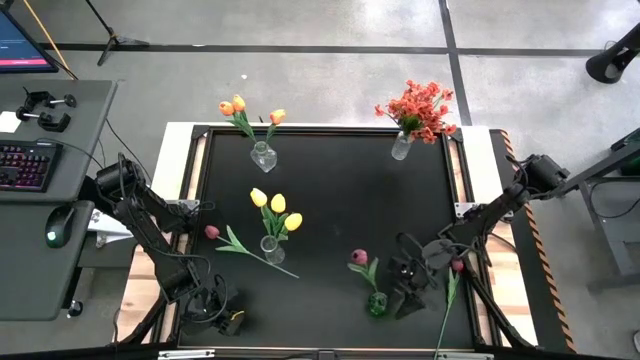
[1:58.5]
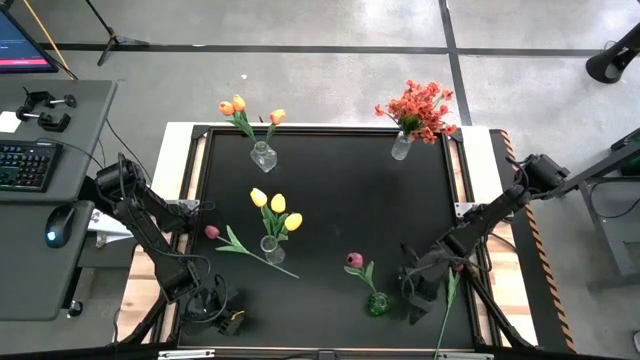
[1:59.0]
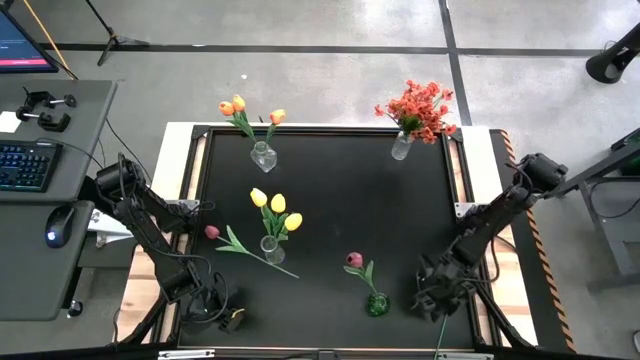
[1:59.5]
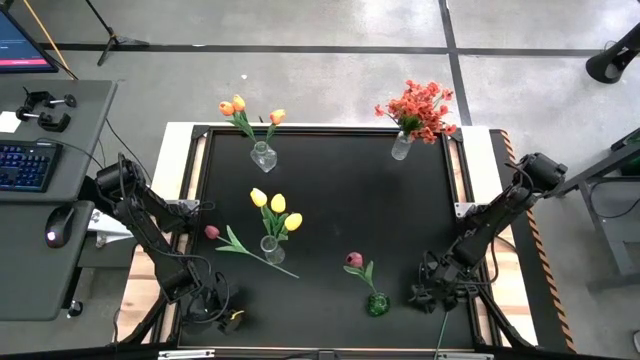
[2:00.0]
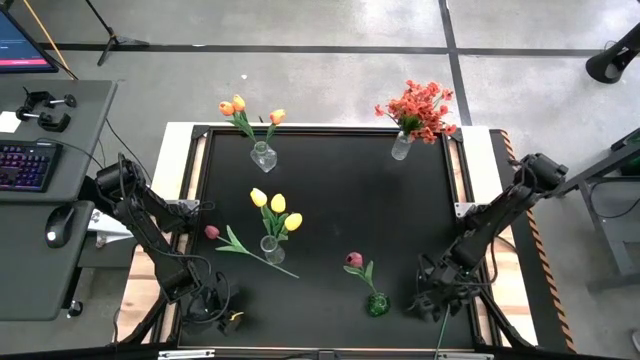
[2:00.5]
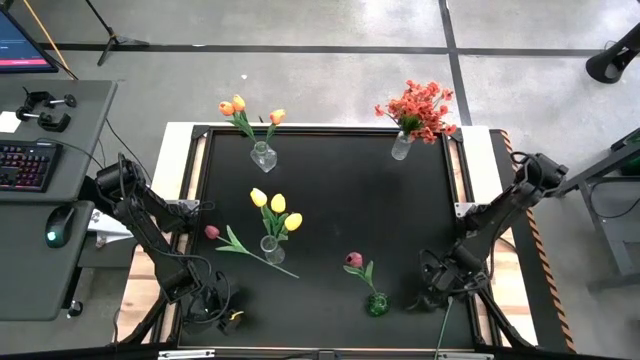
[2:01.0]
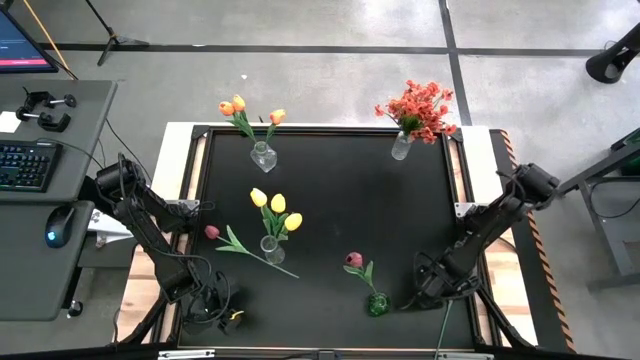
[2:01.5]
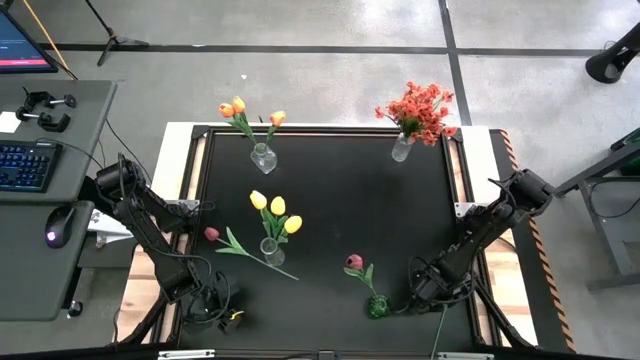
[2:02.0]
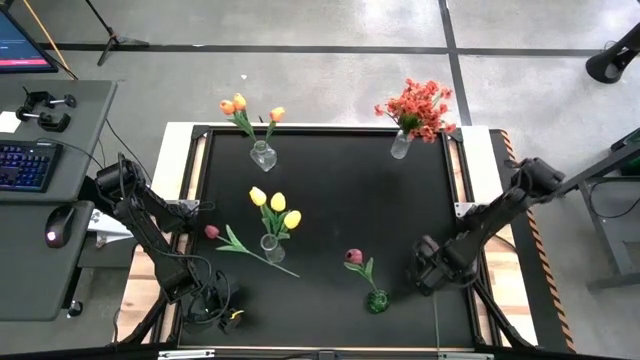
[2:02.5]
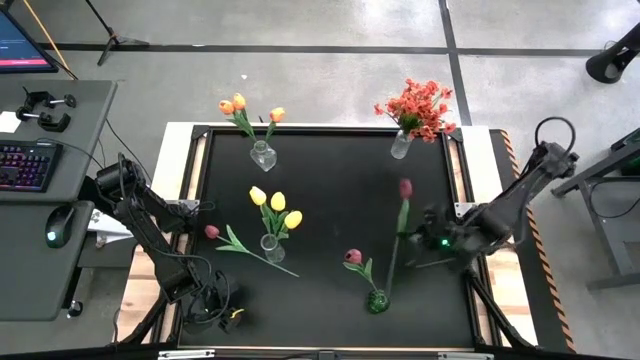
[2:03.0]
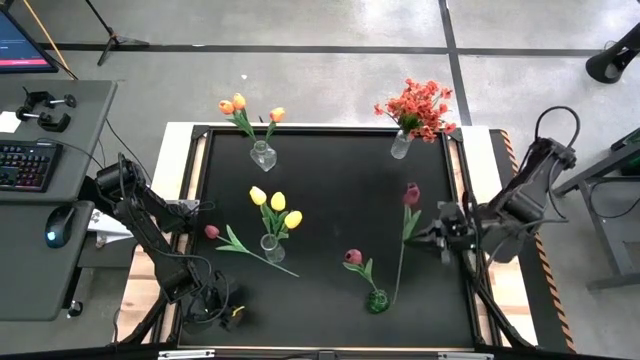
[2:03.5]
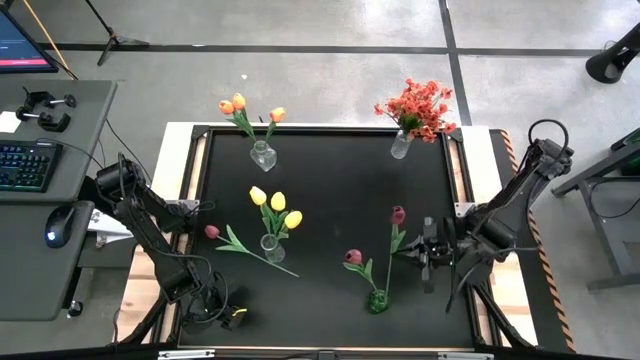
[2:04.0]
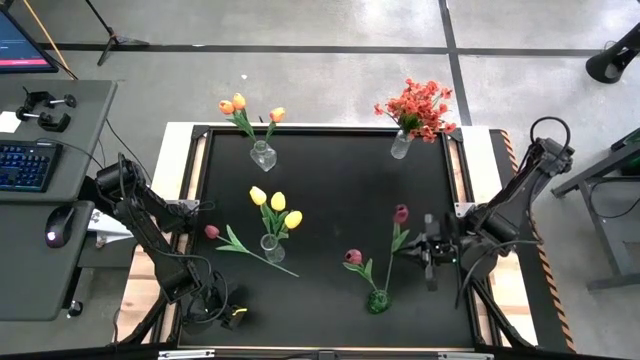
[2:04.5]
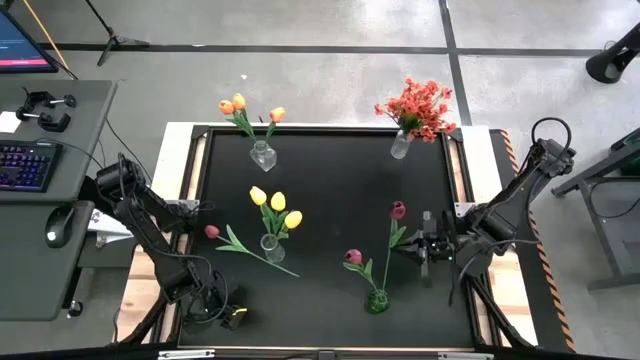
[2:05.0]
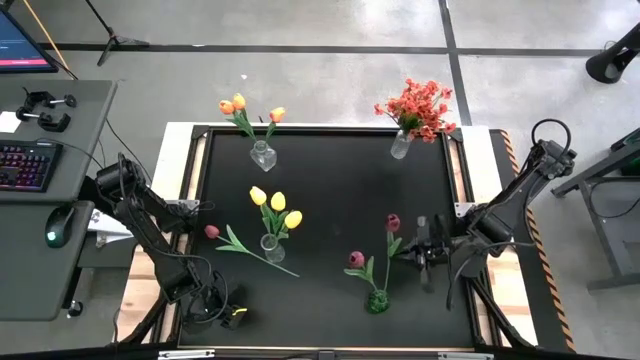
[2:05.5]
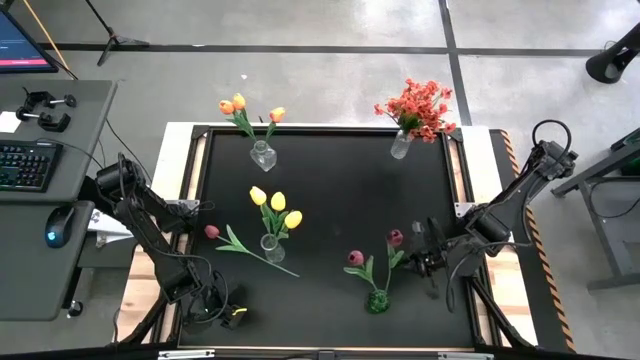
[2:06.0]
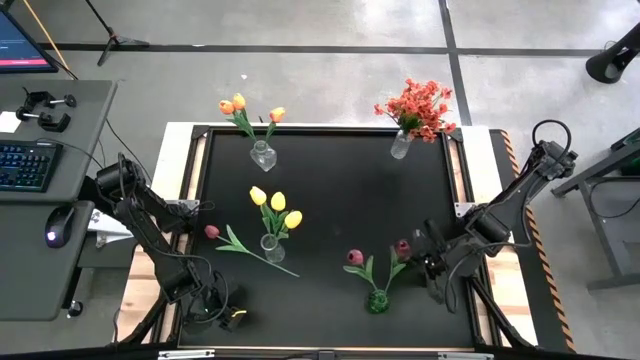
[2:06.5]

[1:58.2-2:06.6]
Task: Sort flowers into vase by color
Put the right dark red flower into the green vase

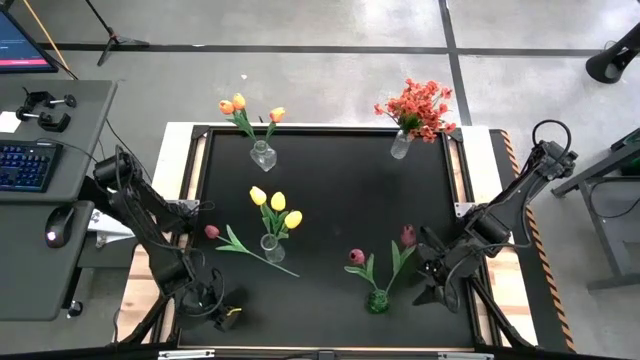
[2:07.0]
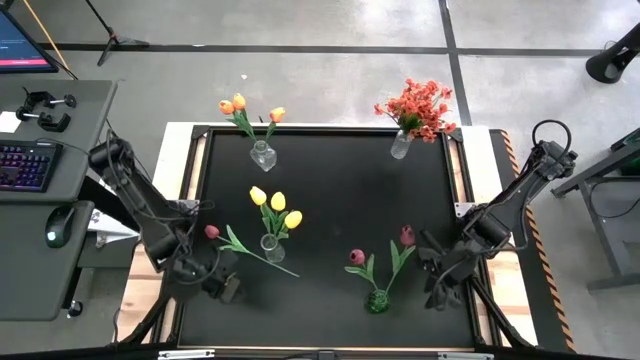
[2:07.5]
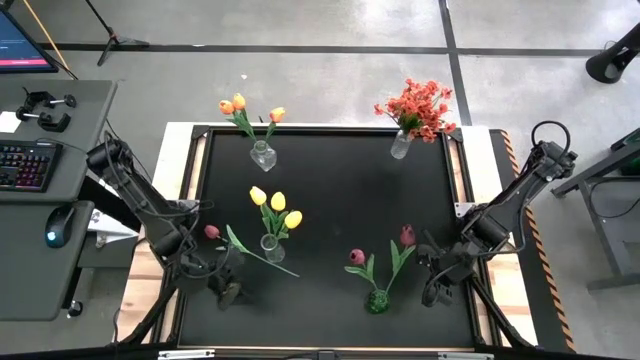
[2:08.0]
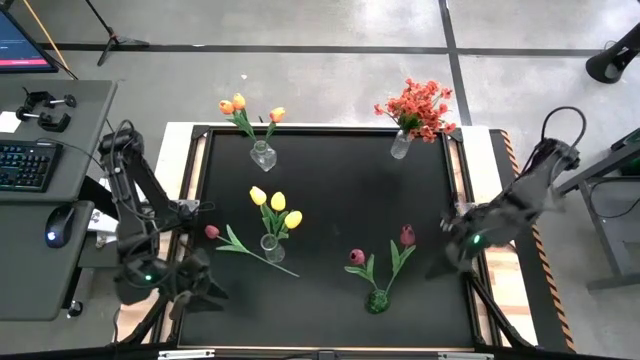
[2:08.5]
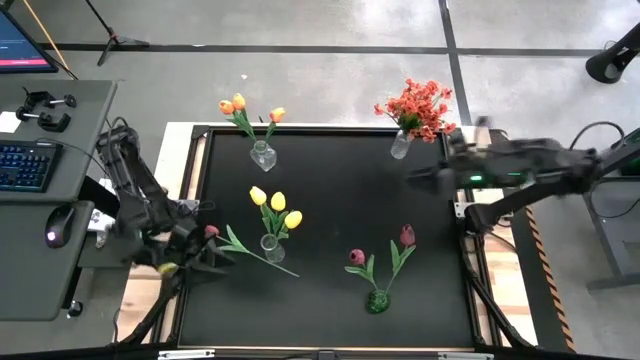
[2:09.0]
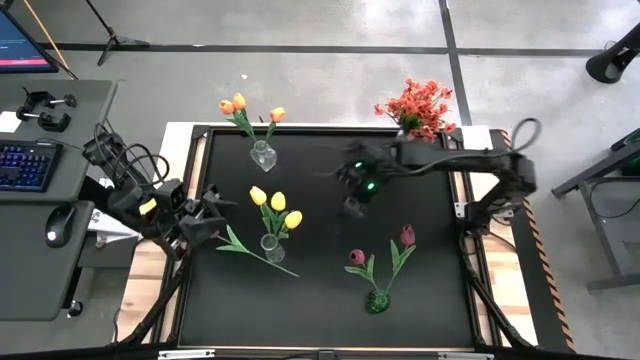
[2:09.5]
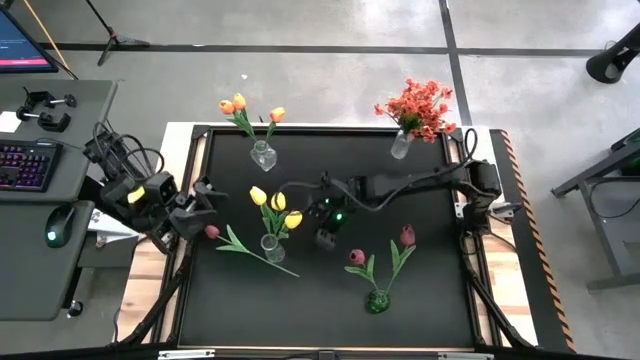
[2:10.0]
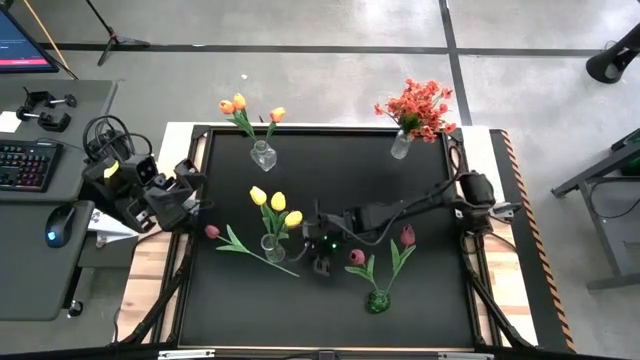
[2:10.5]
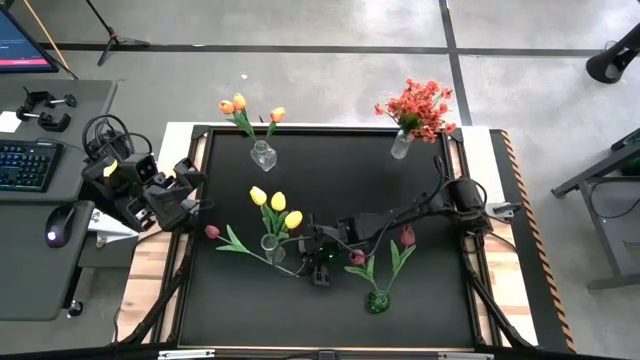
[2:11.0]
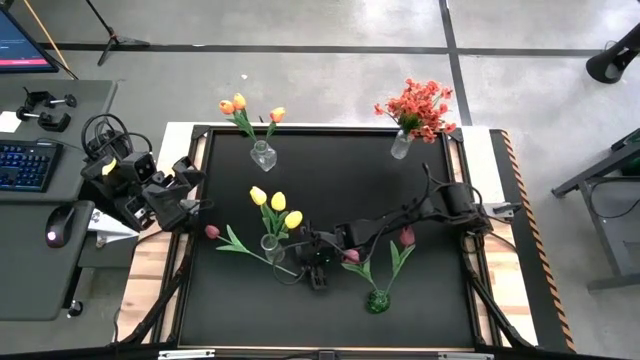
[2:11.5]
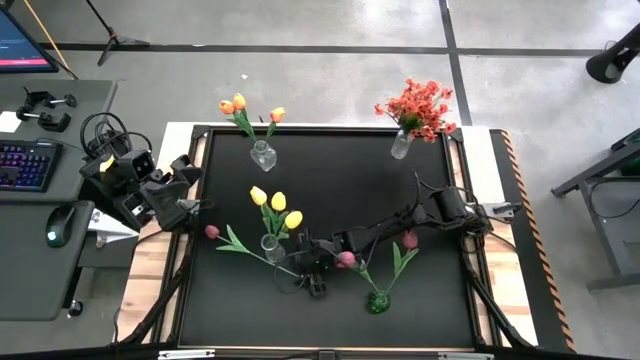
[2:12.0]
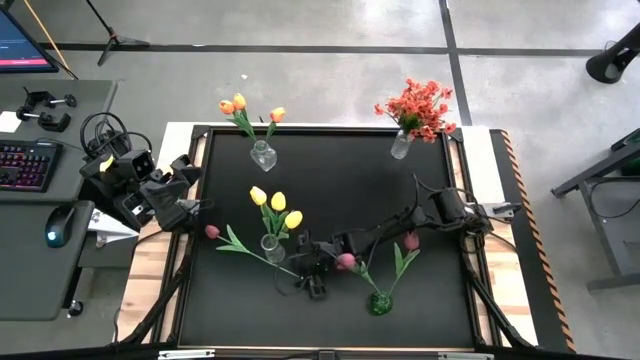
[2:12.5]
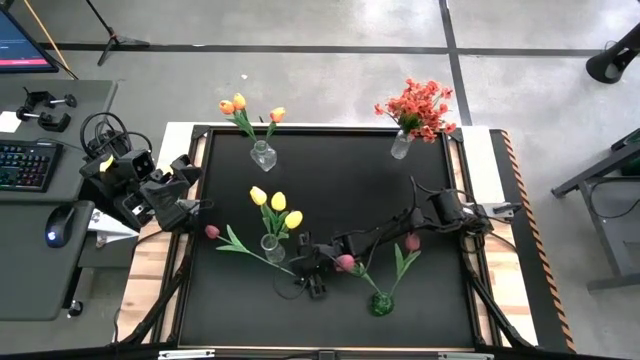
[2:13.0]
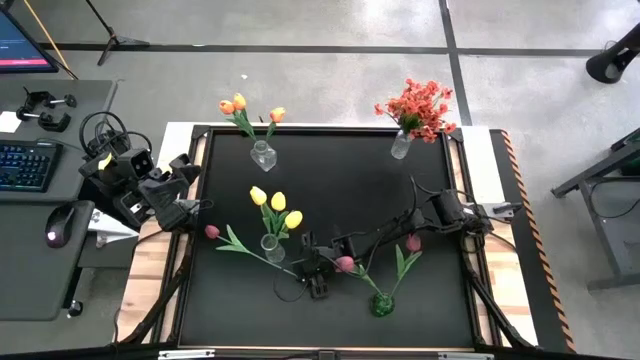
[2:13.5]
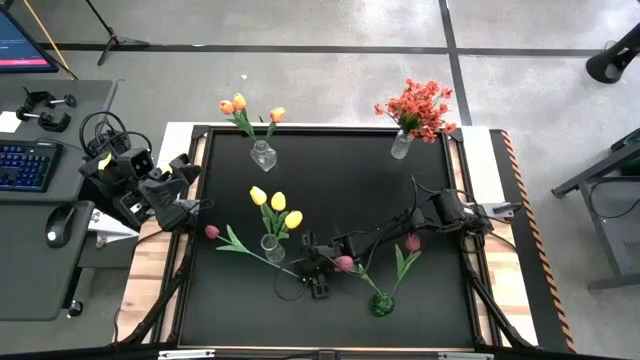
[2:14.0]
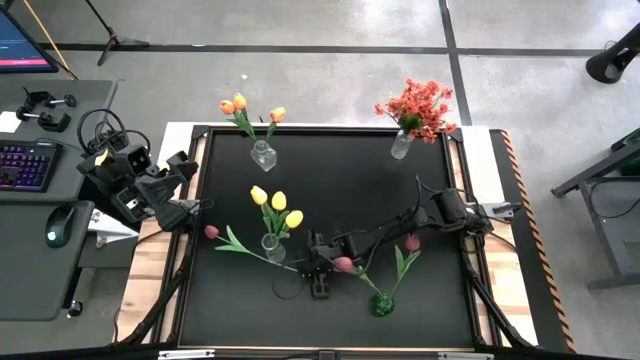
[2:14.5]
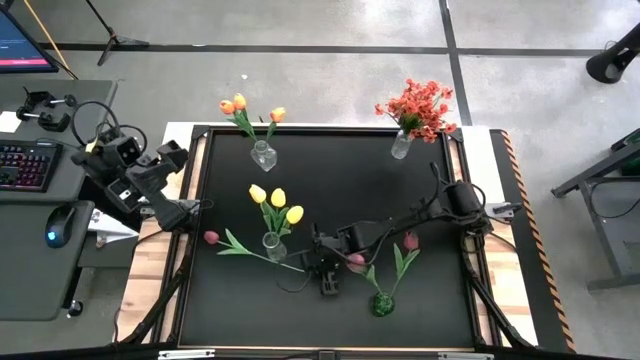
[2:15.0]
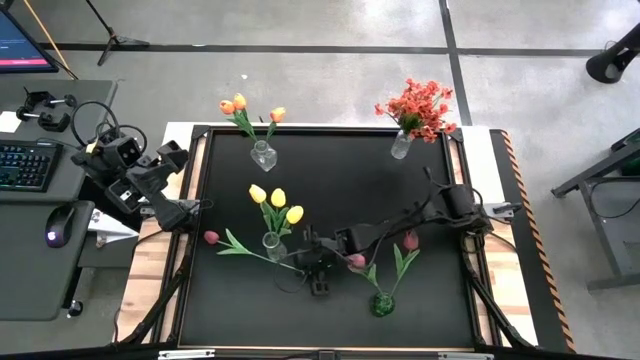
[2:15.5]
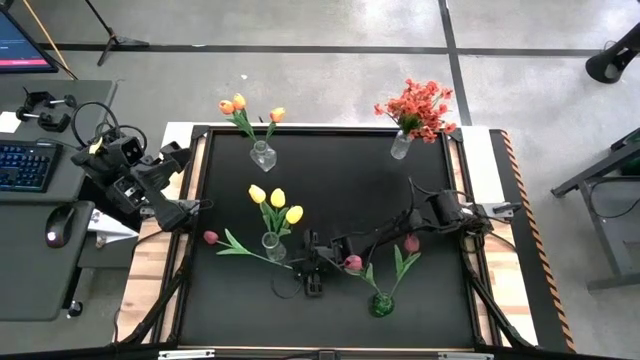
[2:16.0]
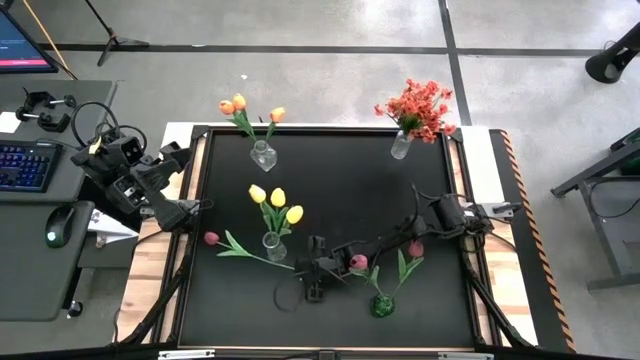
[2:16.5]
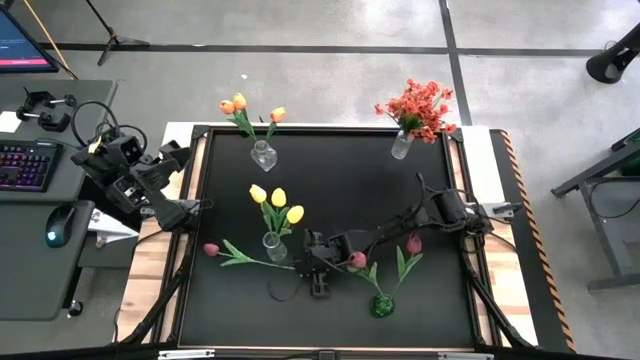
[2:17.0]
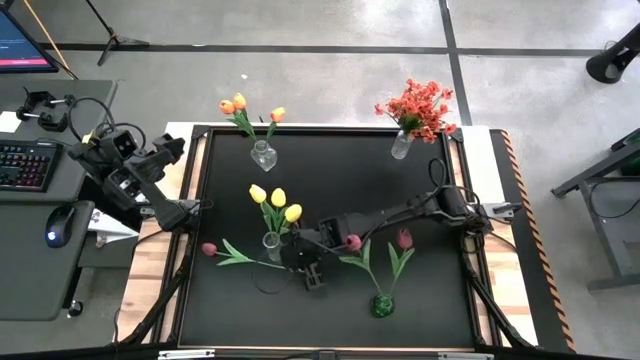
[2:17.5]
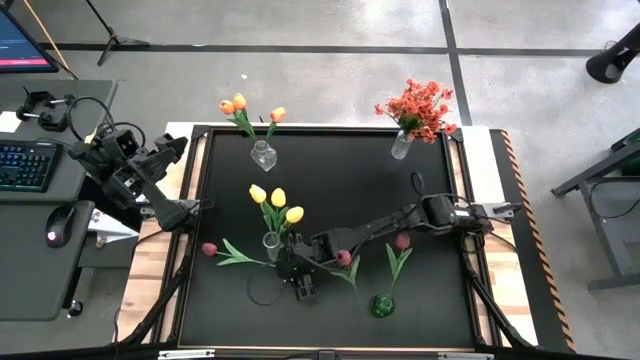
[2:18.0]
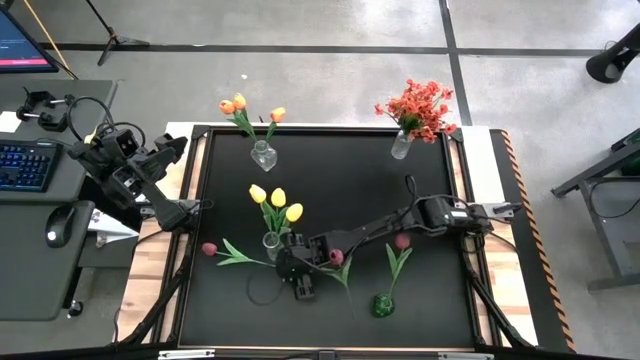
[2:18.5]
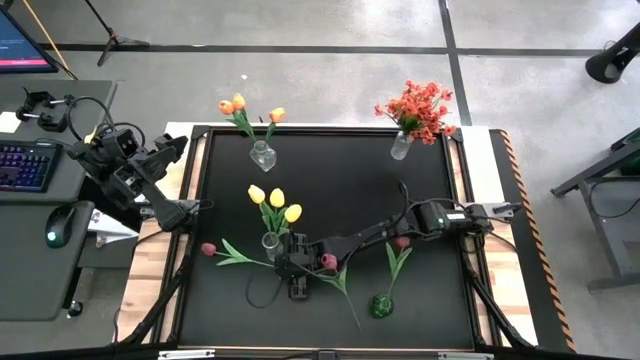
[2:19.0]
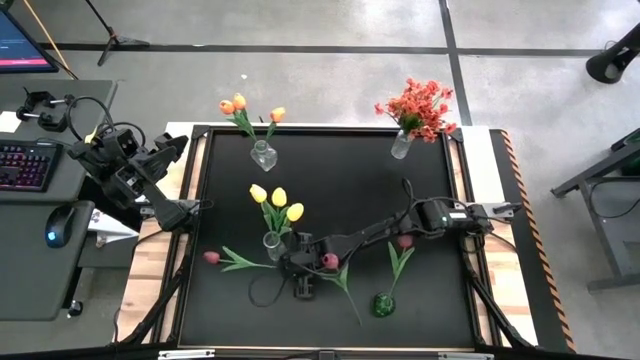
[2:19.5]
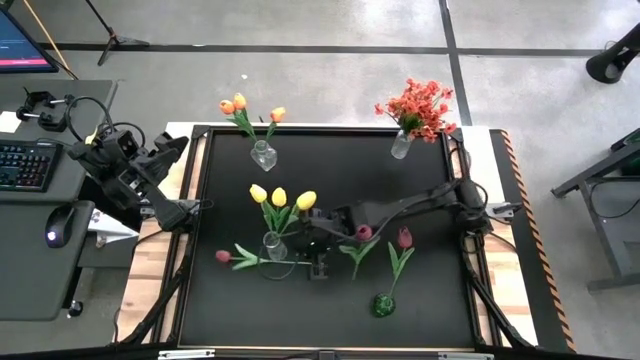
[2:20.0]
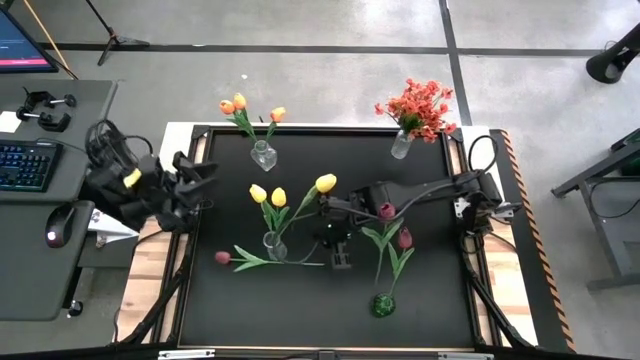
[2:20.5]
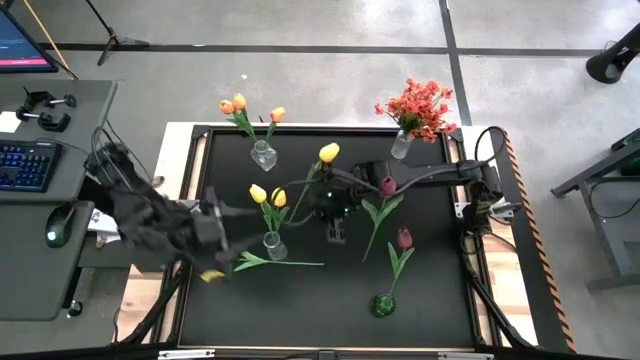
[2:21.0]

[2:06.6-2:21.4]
Put the dark red flower into the green vase
